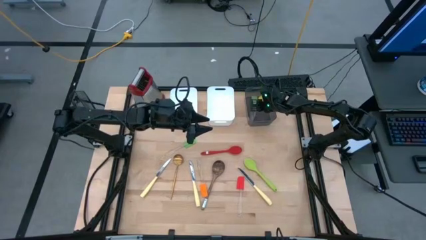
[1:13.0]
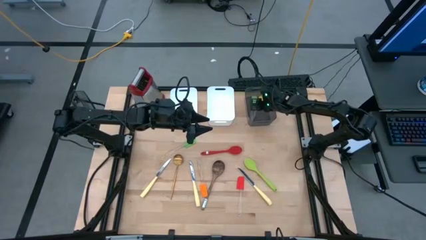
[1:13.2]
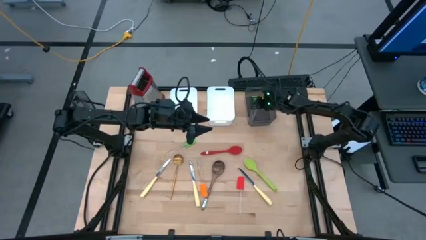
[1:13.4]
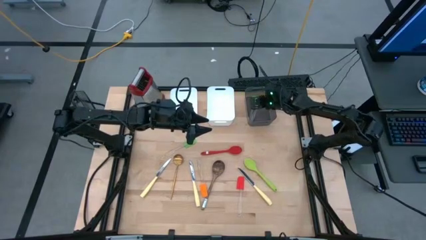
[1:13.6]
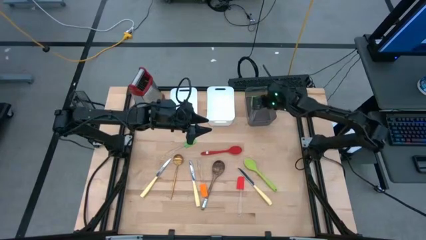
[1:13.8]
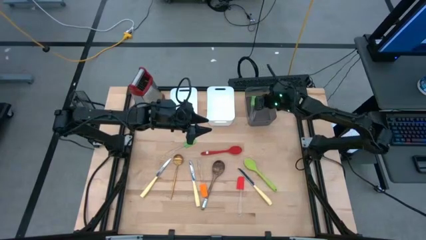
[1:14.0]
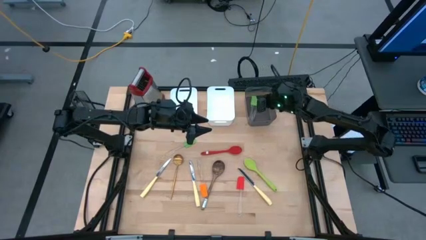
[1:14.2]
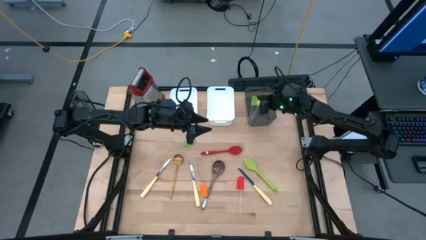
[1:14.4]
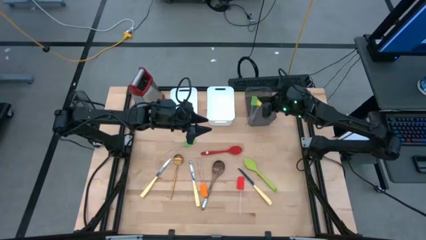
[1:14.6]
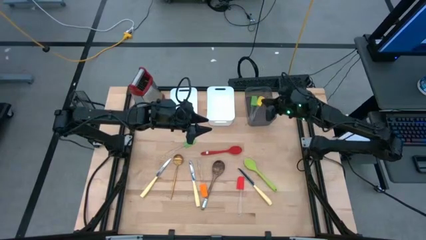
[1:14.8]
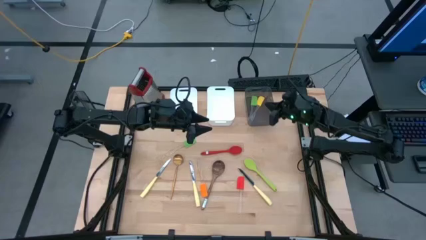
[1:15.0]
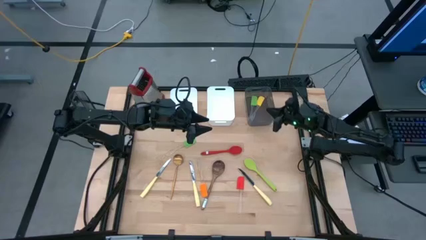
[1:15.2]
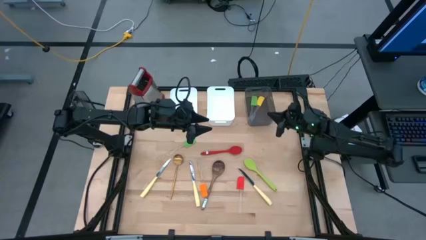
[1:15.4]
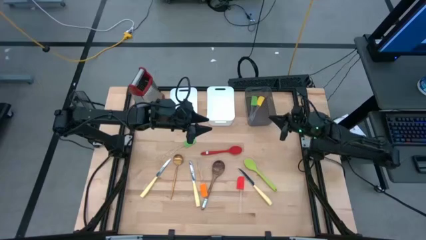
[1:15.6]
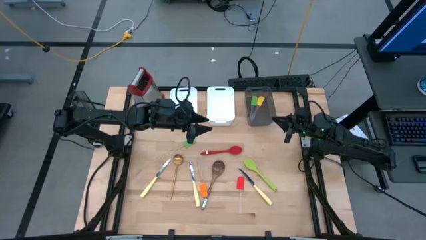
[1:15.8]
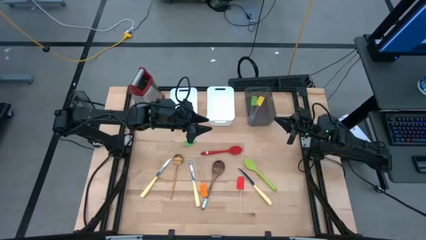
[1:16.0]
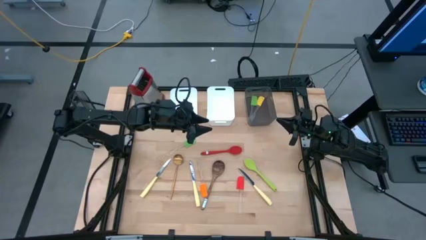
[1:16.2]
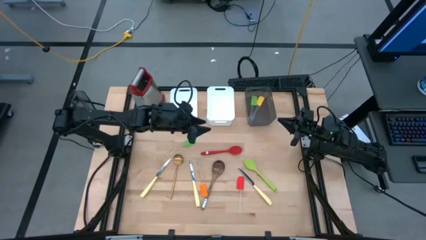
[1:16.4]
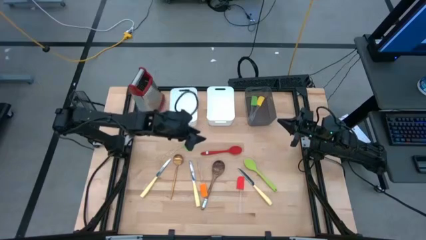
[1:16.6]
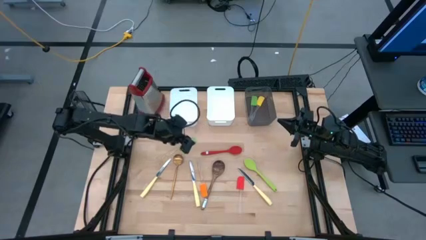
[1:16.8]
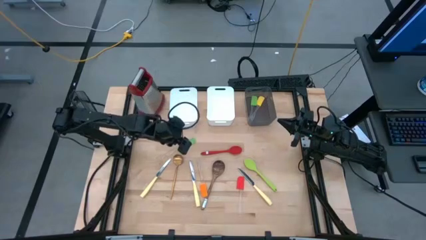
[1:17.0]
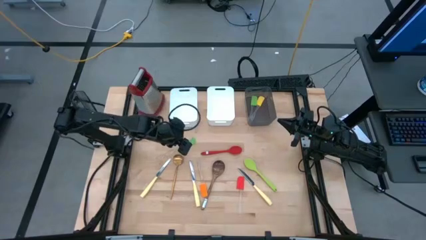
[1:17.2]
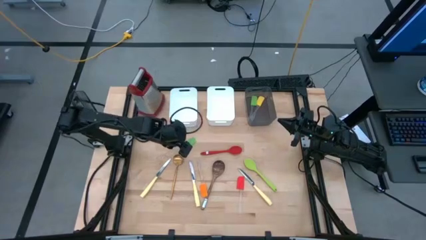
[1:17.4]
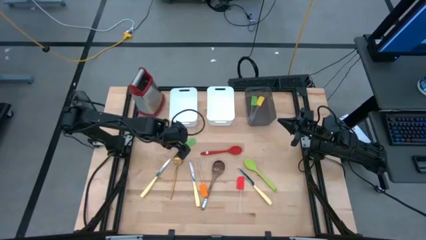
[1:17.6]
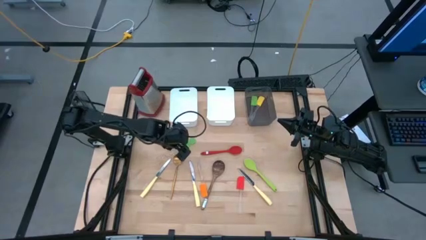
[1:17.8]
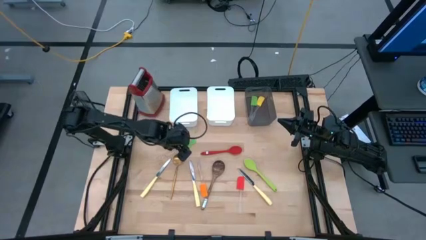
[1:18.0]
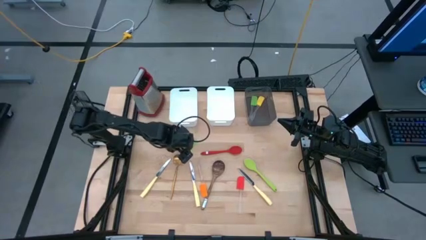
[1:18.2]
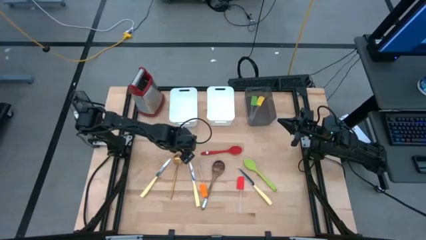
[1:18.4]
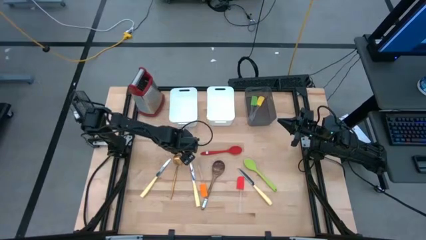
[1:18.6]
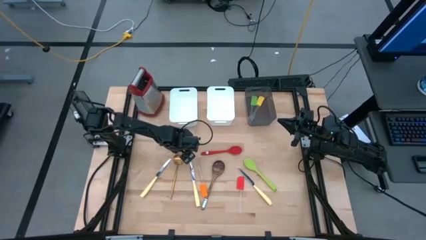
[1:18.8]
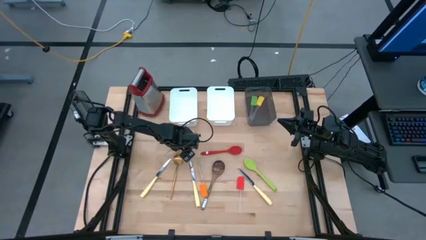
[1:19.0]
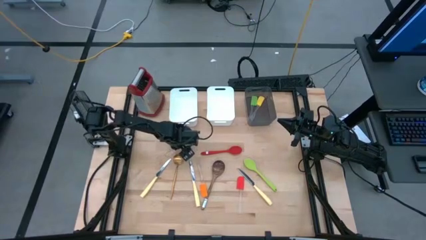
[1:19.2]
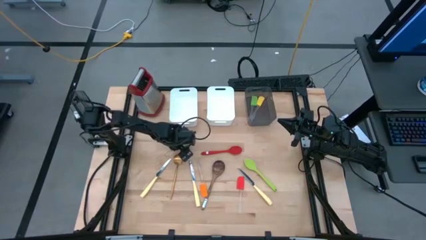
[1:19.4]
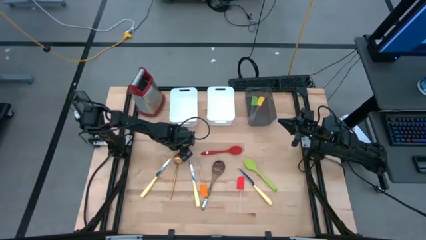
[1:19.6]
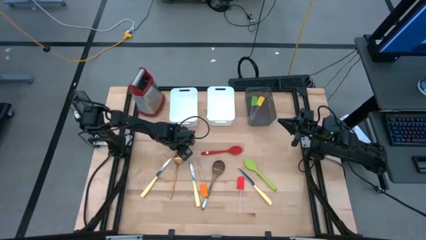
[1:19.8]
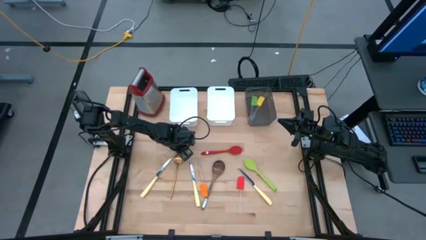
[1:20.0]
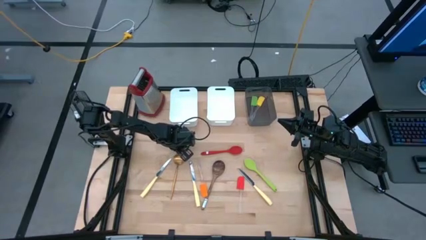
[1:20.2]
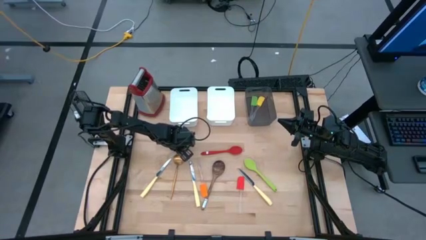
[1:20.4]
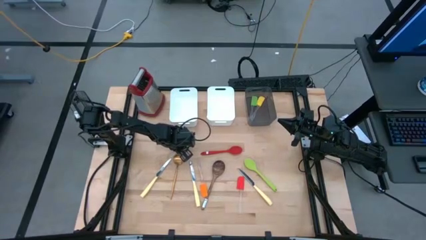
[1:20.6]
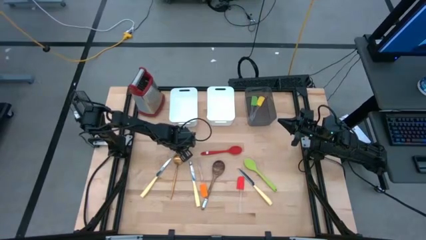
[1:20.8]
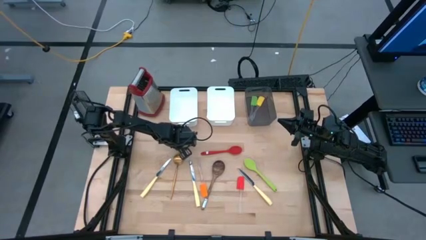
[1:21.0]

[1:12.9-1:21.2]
Task: Pick & Place Kitchen Items
Put the green silicone spatula into the black bin

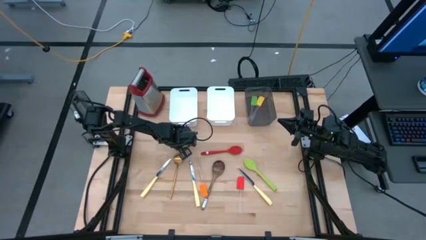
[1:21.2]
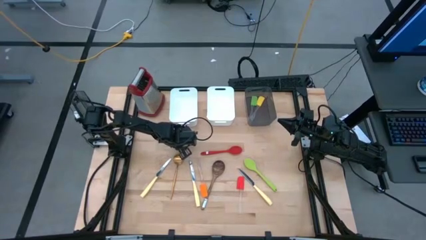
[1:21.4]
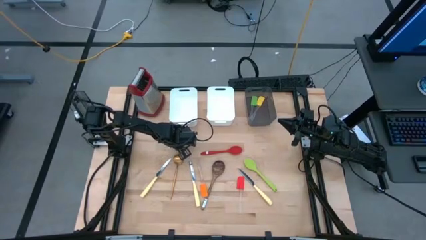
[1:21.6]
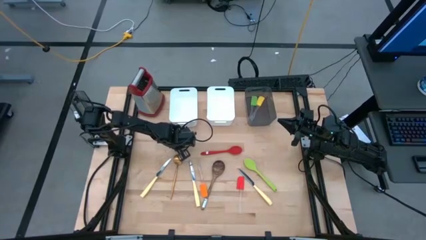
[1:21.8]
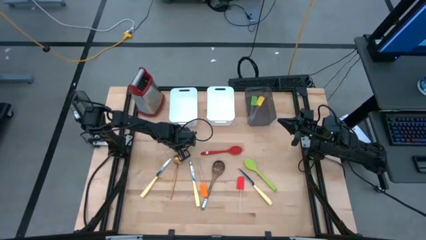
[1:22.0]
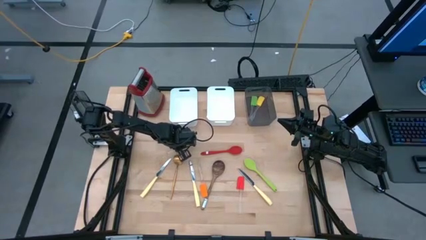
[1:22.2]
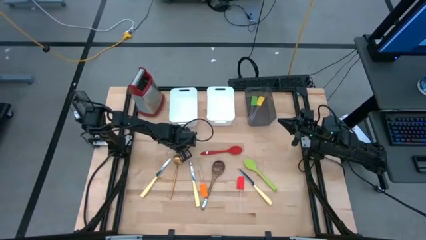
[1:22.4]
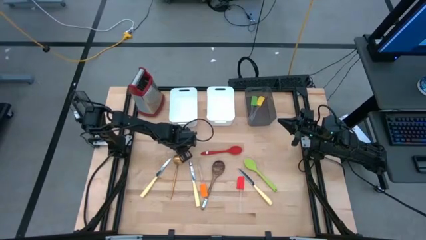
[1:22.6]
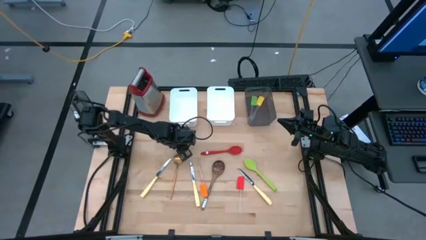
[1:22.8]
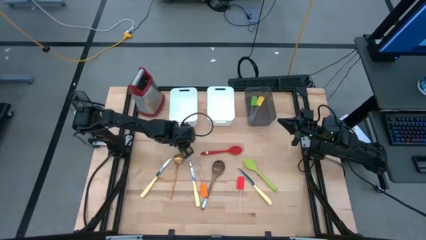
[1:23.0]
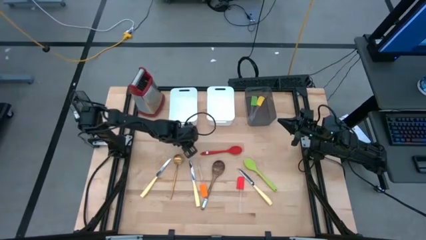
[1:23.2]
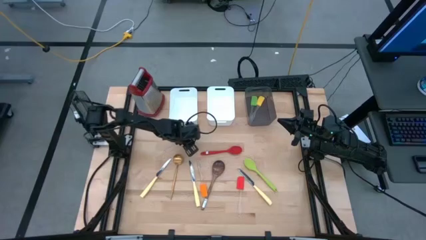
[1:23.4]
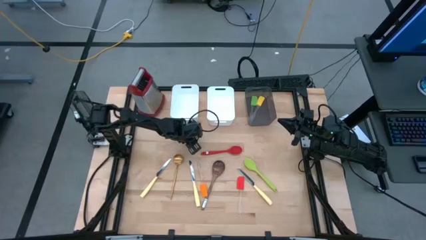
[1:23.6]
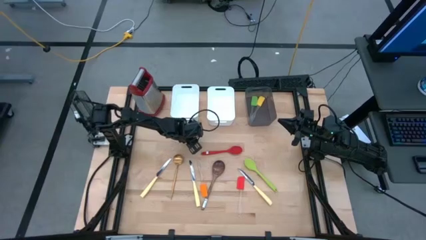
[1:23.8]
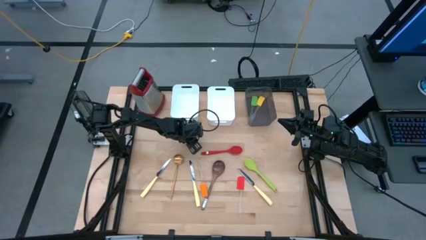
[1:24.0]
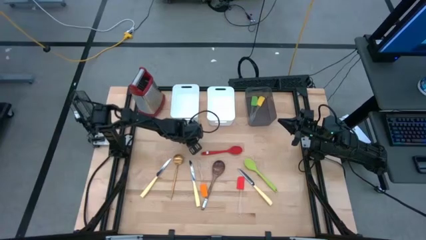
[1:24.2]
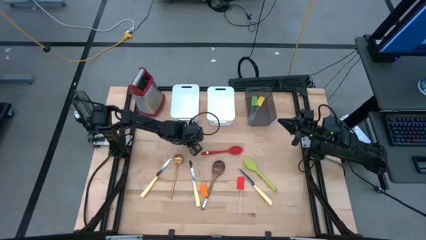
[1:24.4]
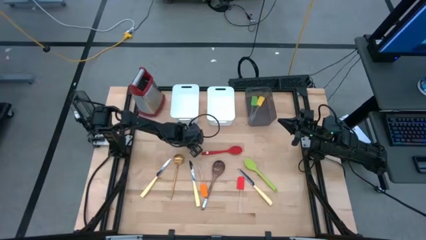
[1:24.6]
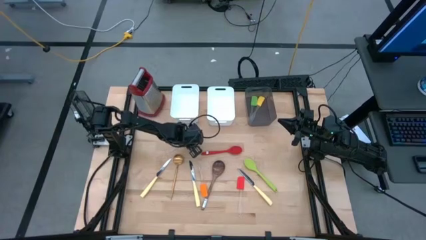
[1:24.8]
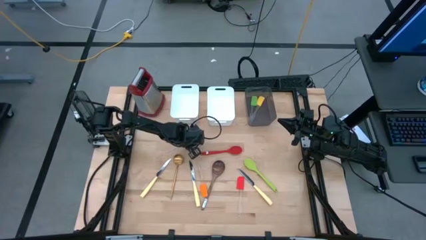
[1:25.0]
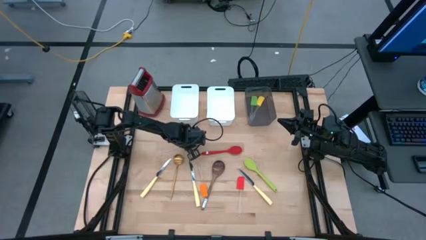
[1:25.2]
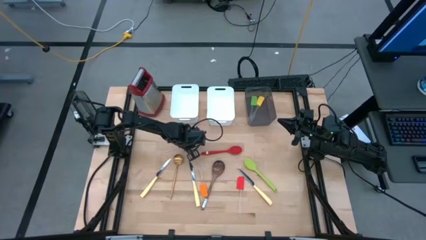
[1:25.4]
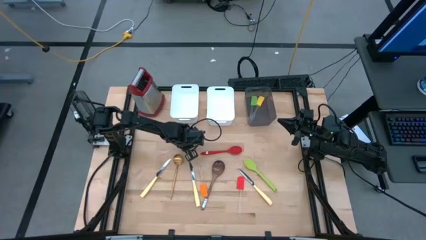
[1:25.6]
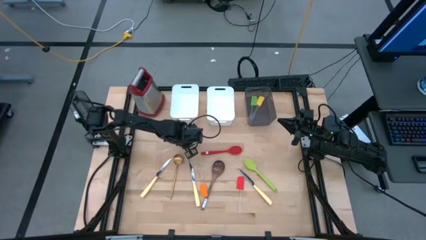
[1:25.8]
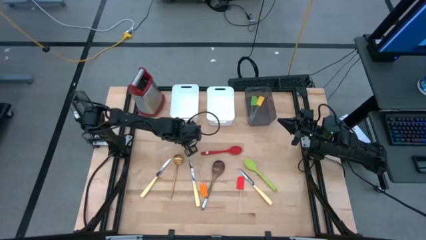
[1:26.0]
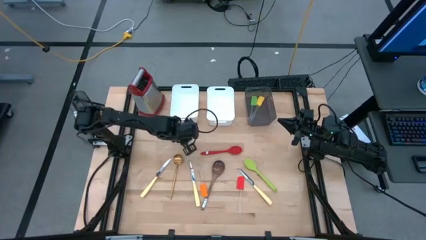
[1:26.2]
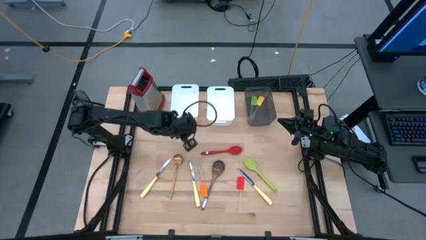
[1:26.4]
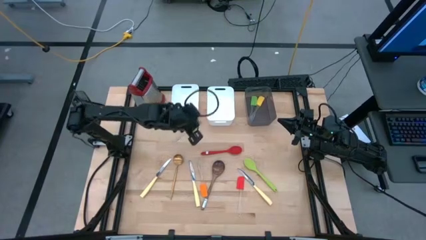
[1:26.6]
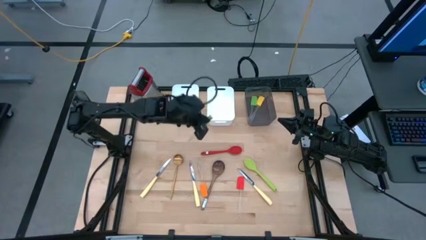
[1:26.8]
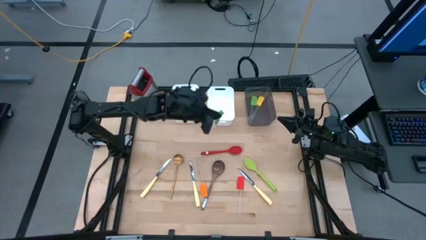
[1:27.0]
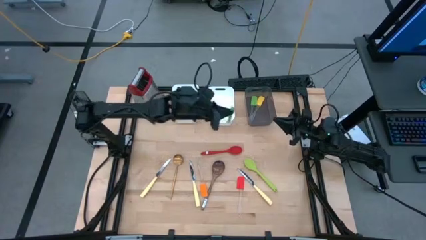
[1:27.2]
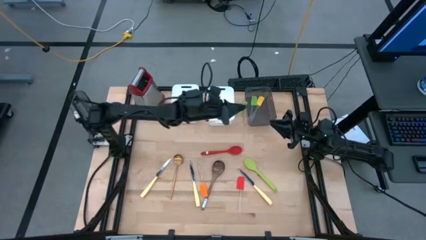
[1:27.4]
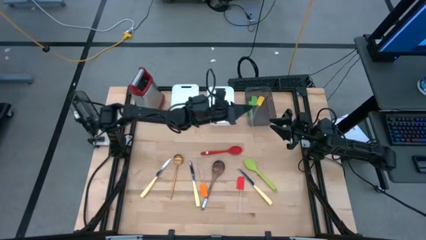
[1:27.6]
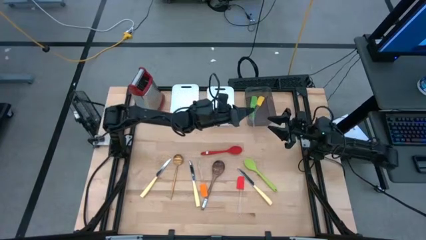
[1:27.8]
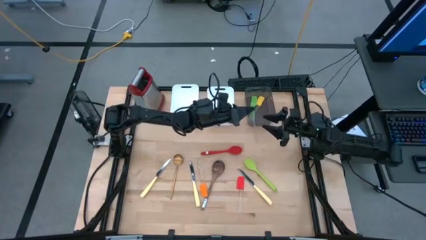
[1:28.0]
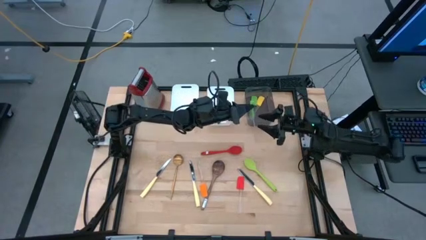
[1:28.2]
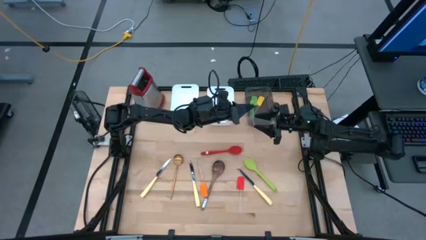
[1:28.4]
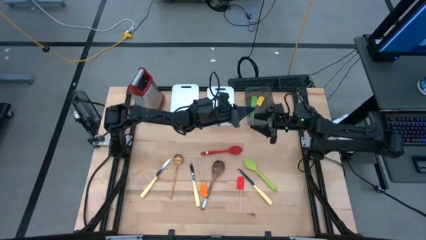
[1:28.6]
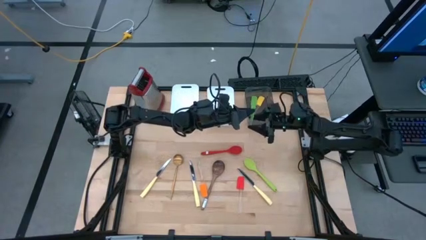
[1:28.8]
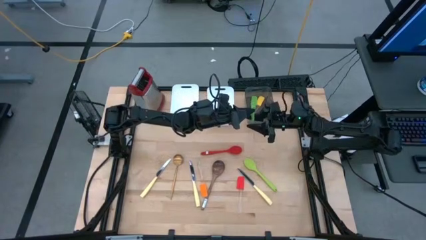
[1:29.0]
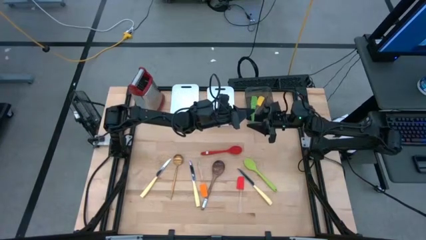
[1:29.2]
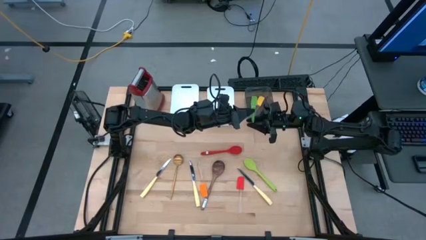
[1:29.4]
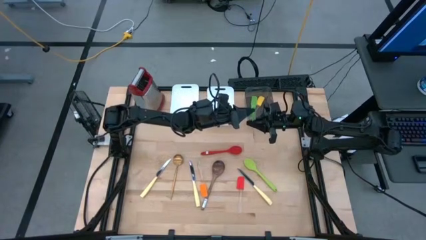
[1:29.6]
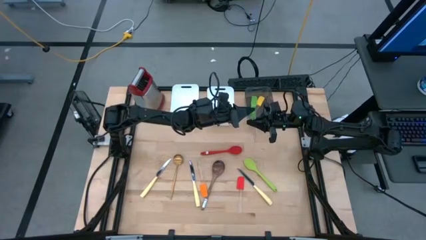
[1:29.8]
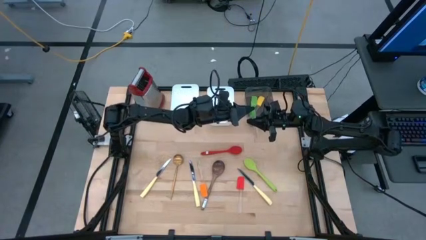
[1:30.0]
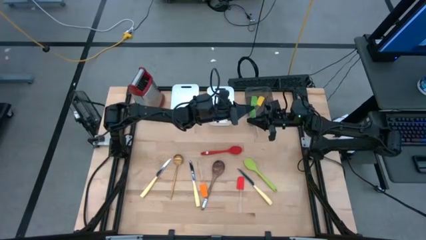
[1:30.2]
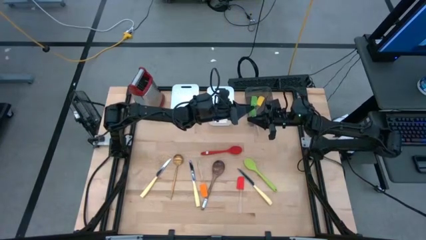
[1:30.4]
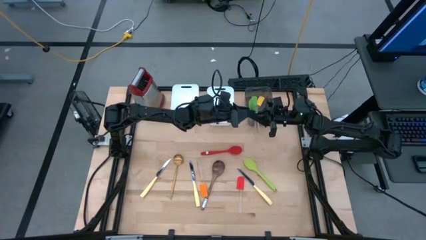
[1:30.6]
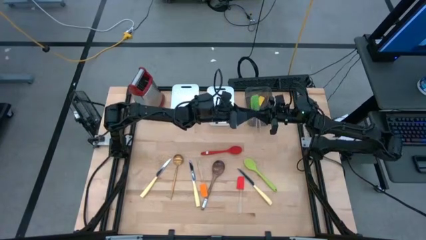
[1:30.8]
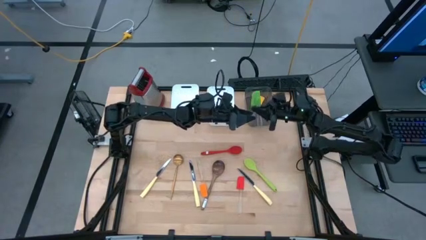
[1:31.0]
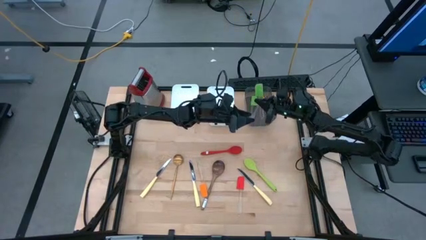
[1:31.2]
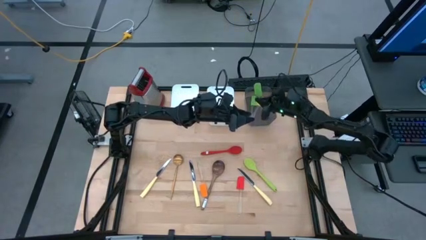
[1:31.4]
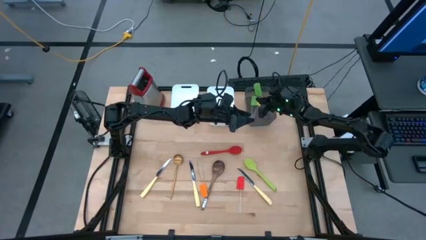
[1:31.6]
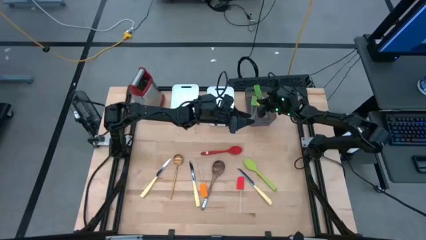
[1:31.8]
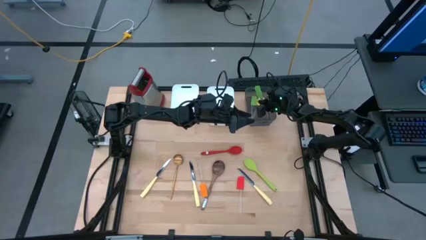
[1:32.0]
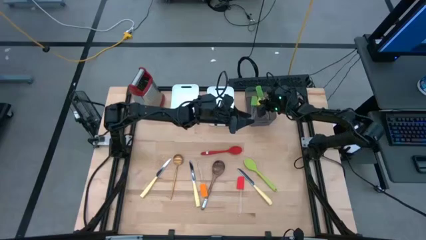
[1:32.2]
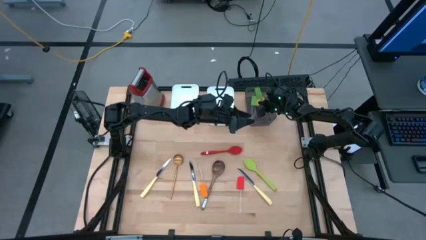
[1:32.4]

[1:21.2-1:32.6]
Put the green silicone spatula into the black bin
